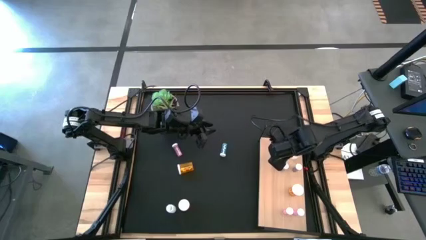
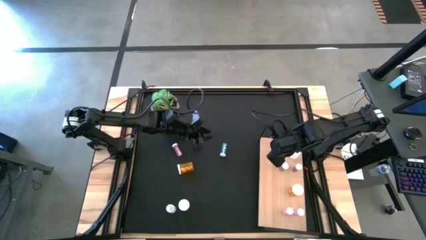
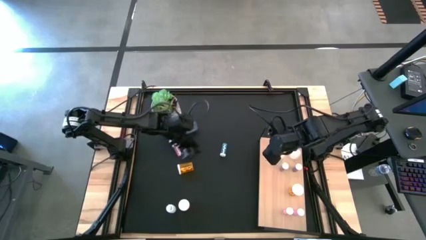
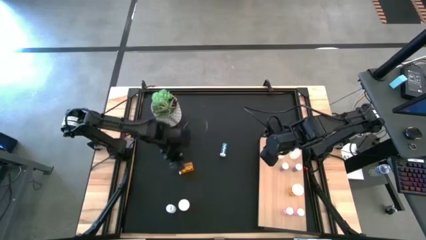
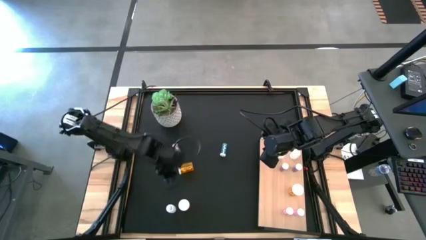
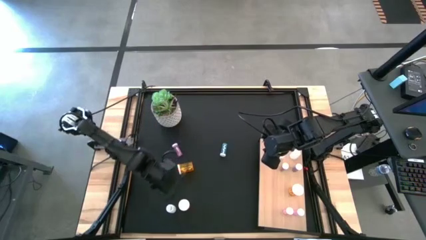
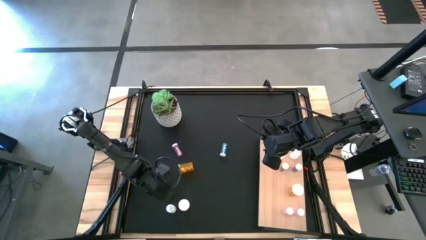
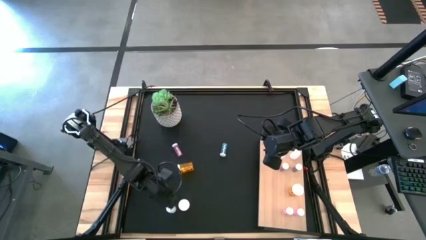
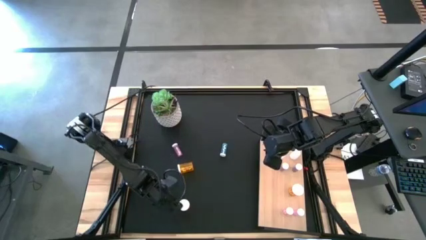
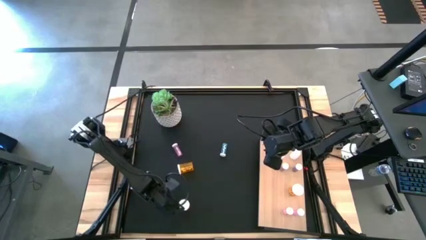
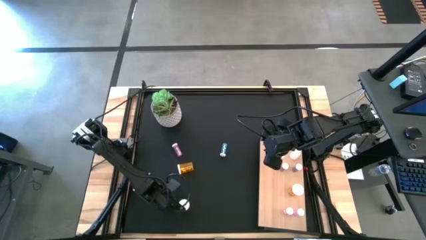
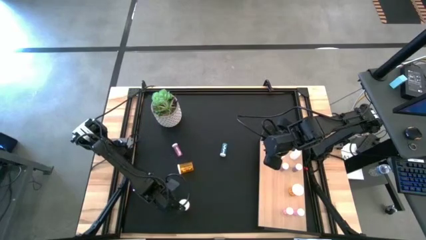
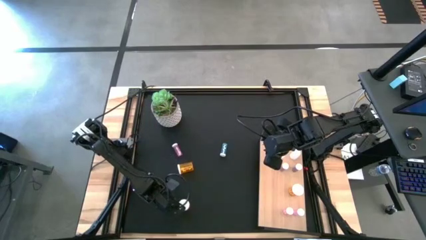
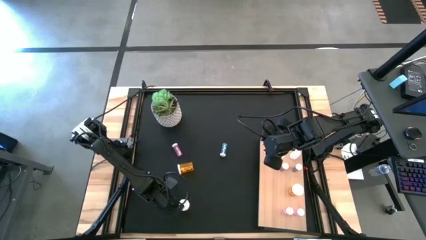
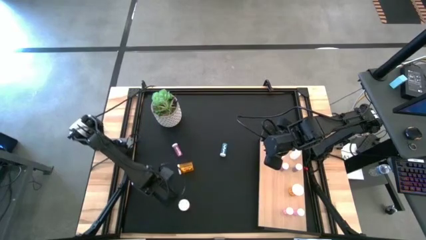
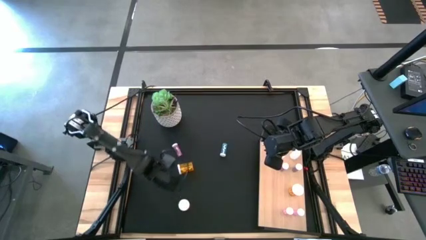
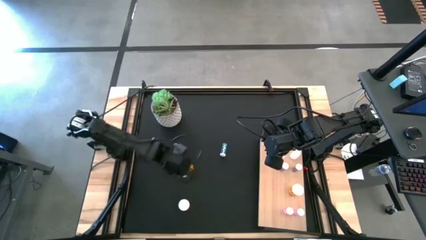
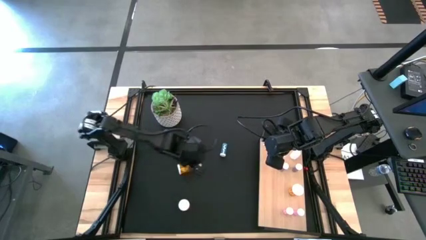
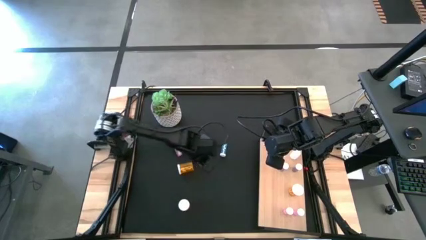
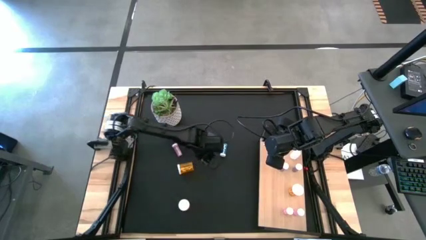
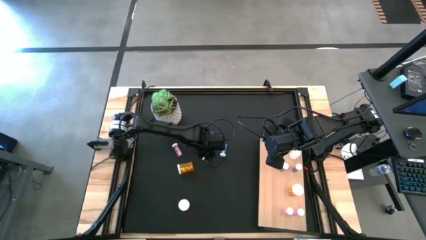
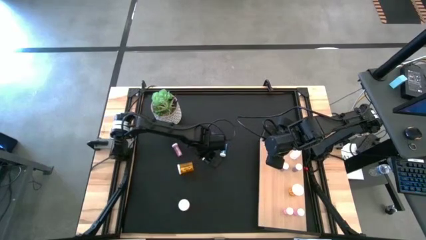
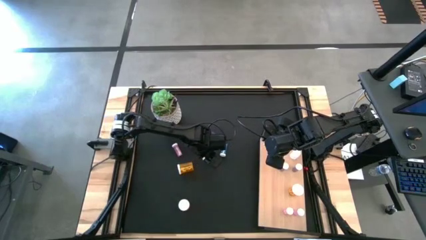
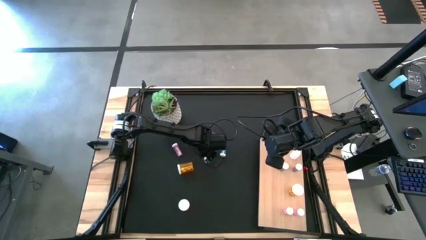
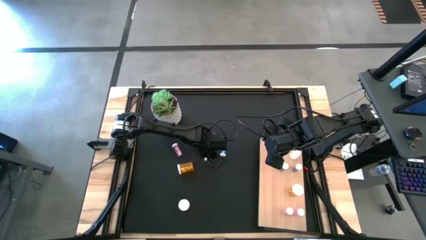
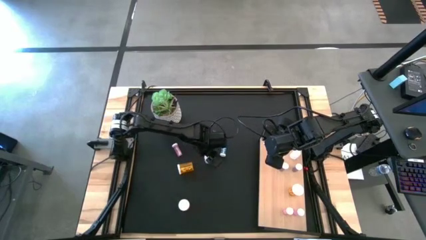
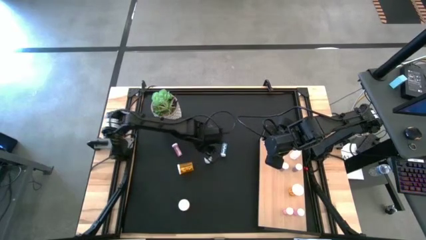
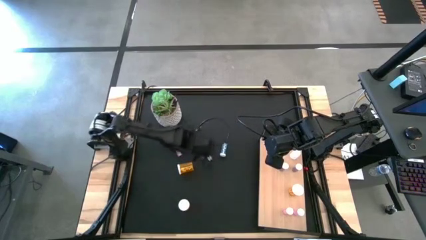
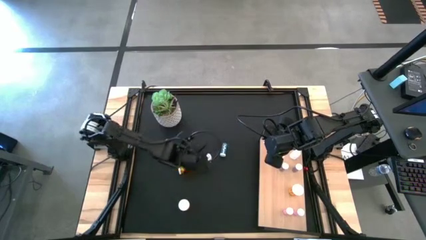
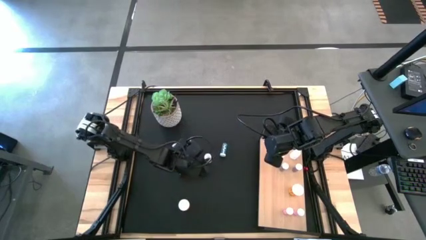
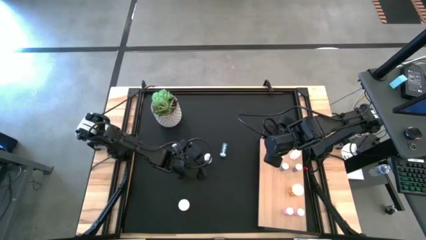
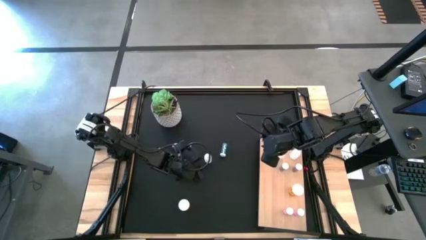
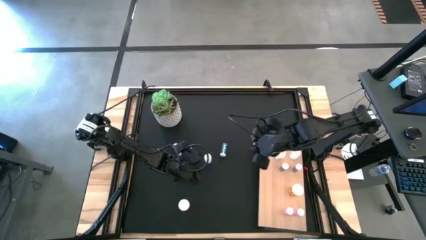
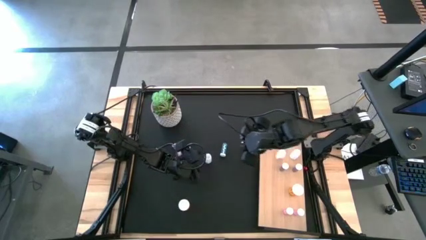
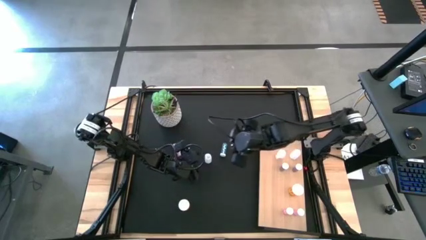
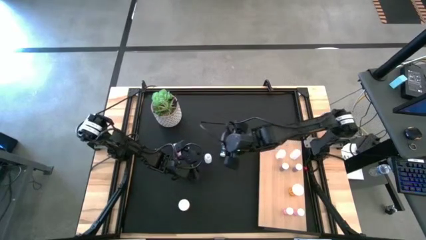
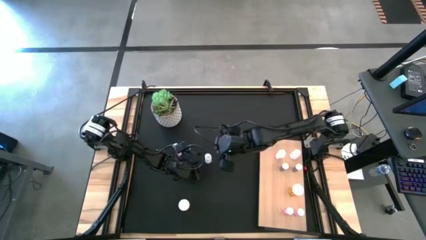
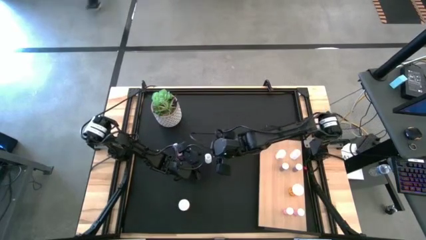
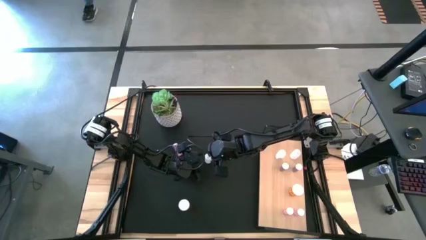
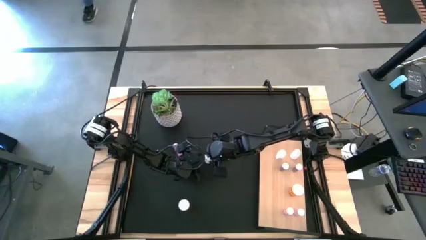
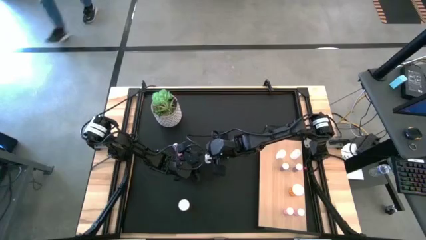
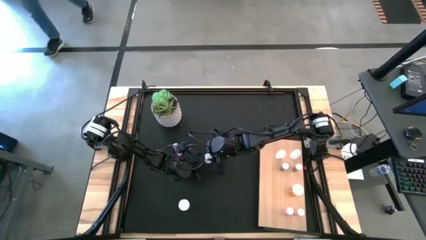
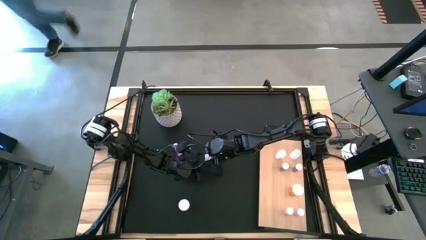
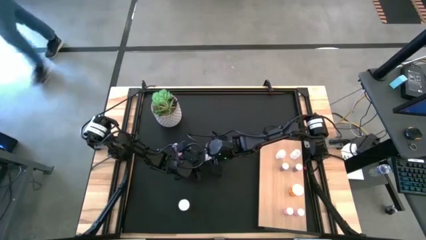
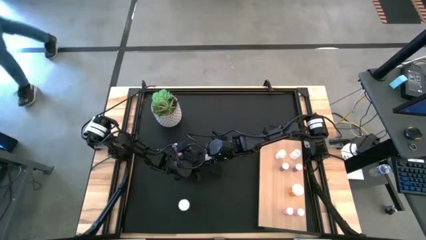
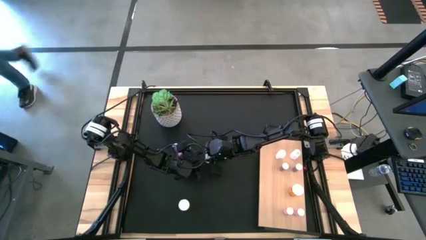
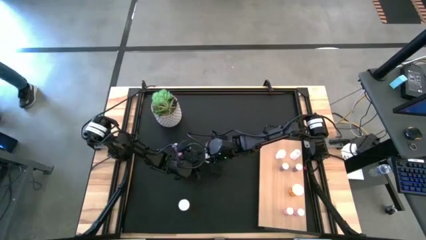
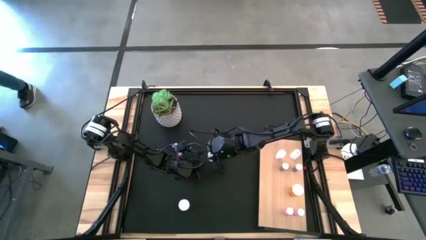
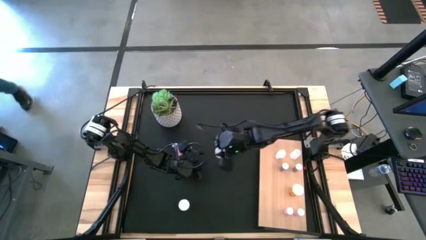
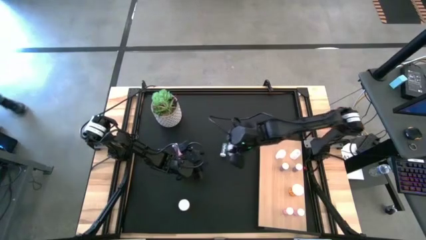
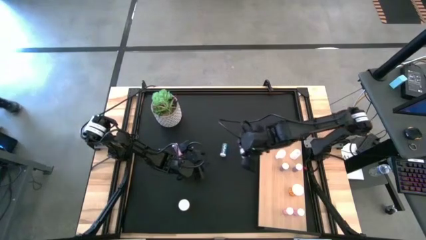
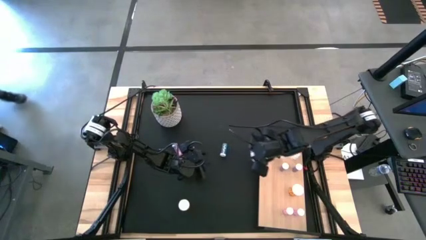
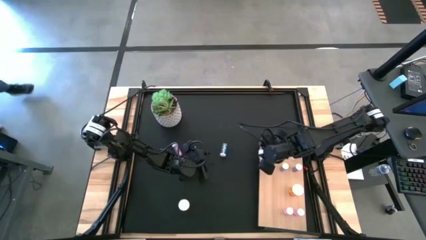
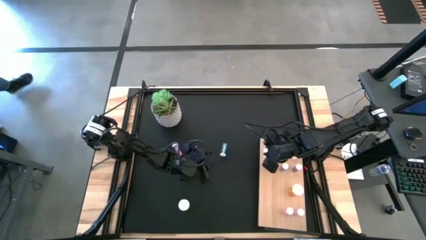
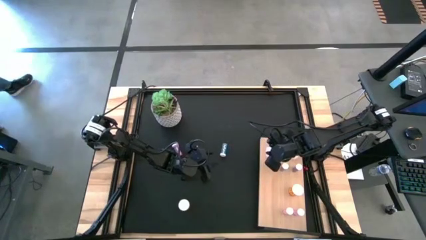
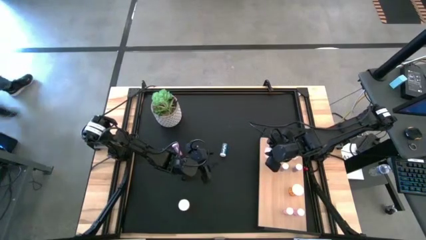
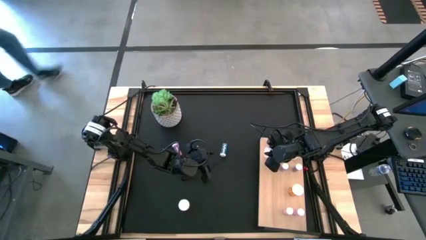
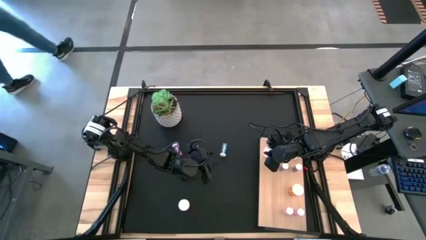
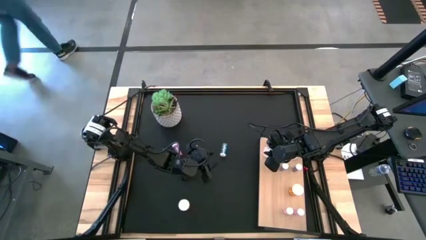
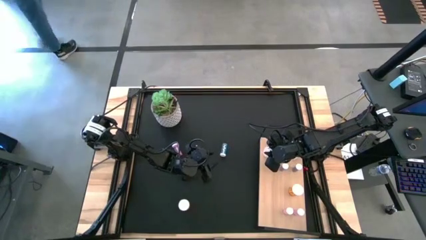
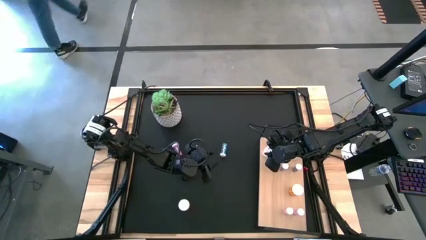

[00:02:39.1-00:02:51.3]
Task: Pick and place medicine bottles onto shelf by color
Put the white pill bottle on the shelf aligned with the other white pill bottles

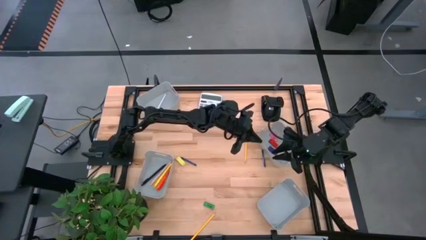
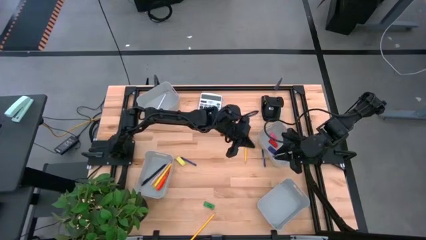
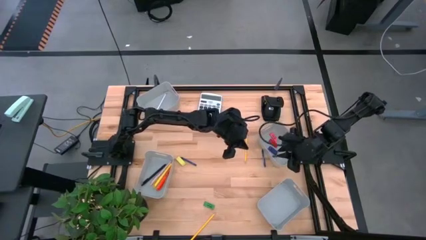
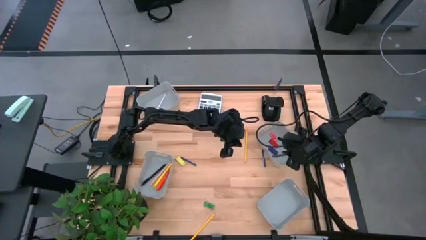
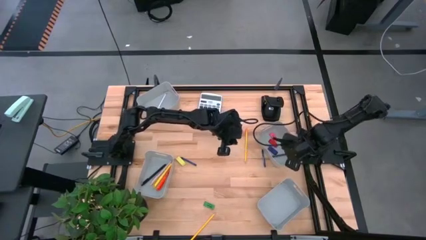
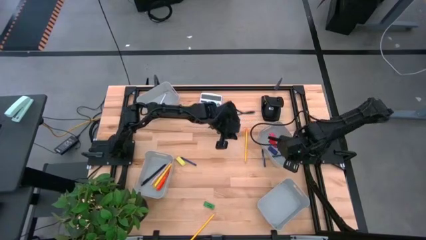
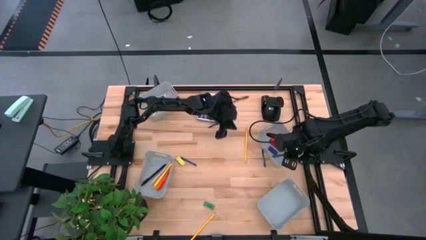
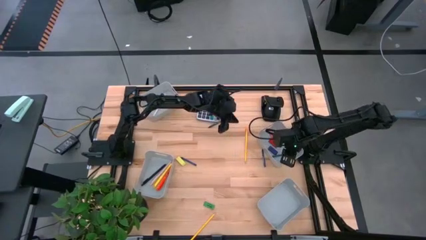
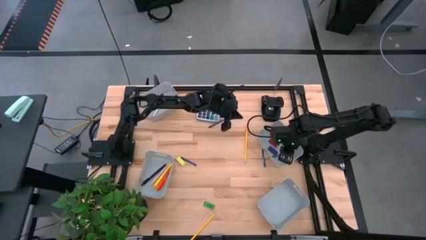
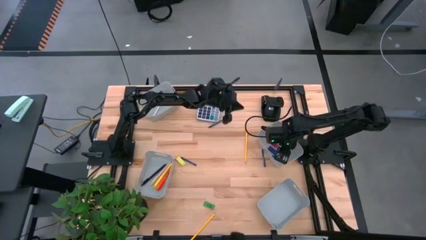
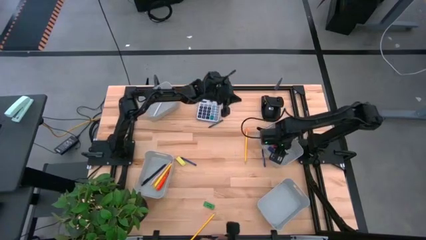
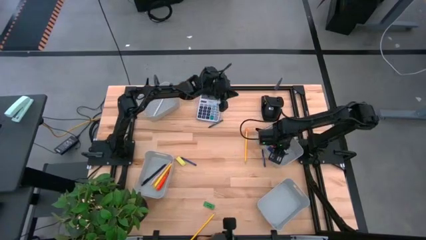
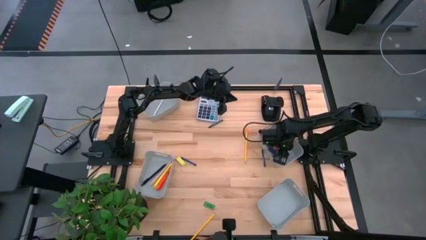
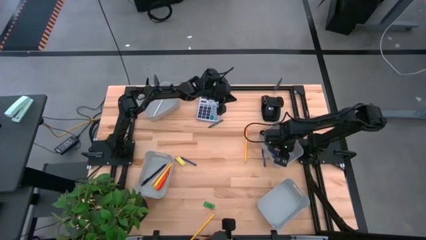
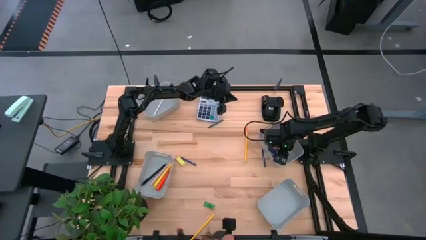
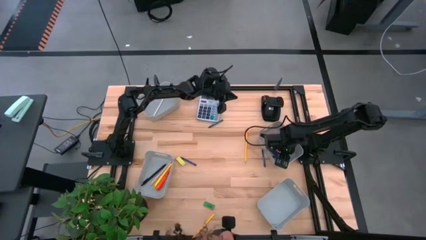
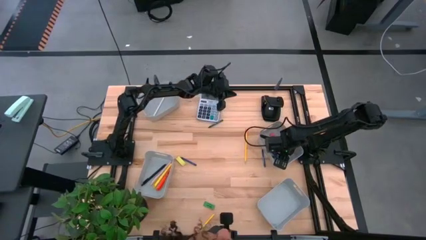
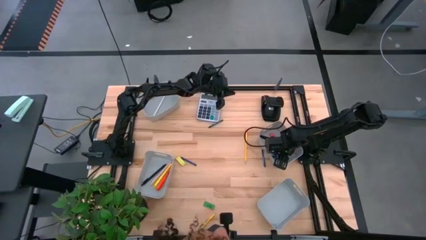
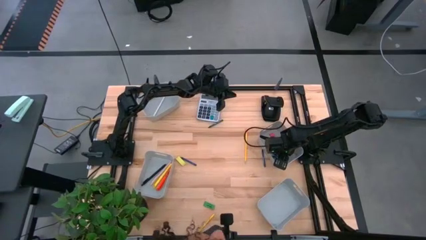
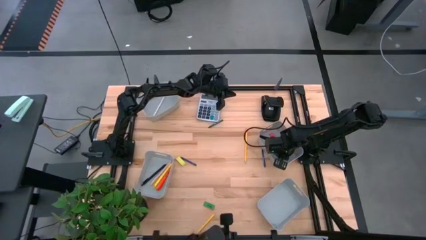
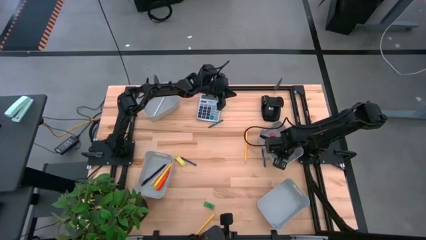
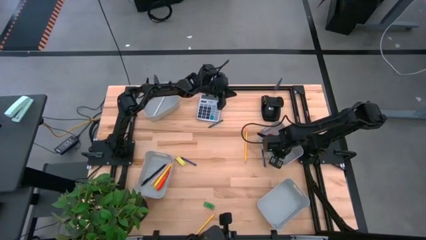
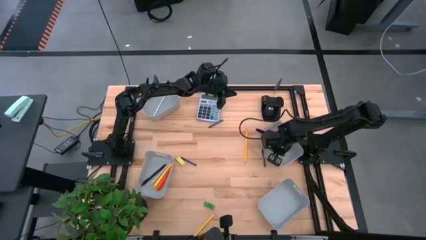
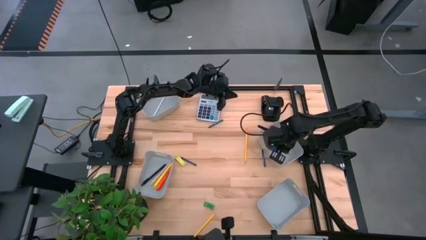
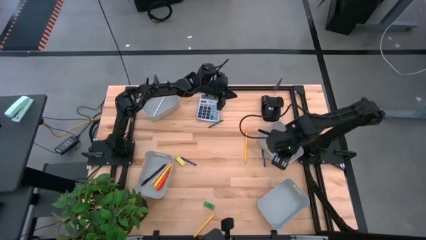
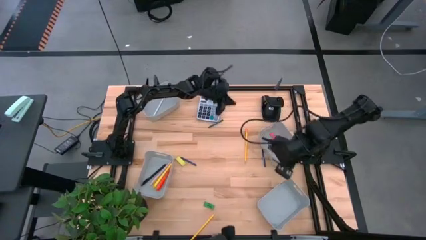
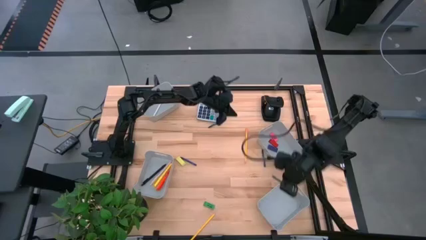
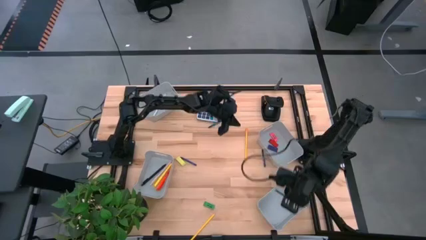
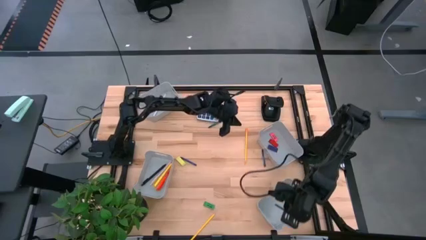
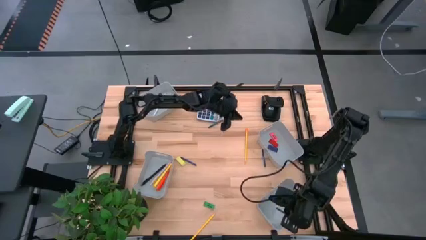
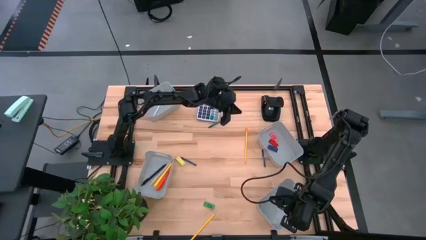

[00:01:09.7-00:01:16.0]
Task: Sort crayons/erasers/pens/pencils in bins
Put the bottom green crayon into the bottom right gray bin
